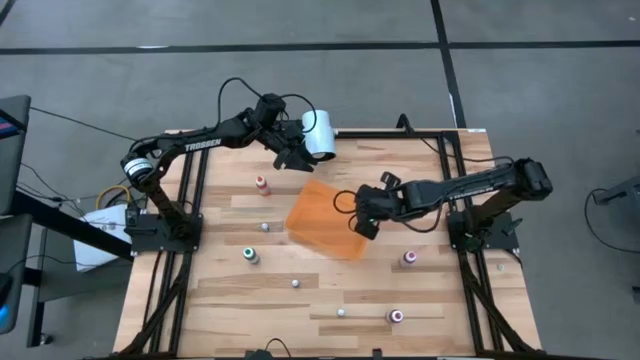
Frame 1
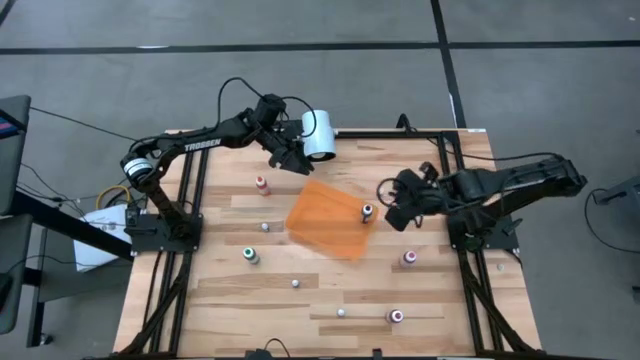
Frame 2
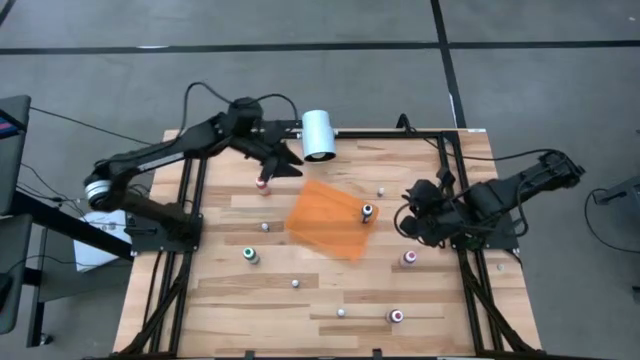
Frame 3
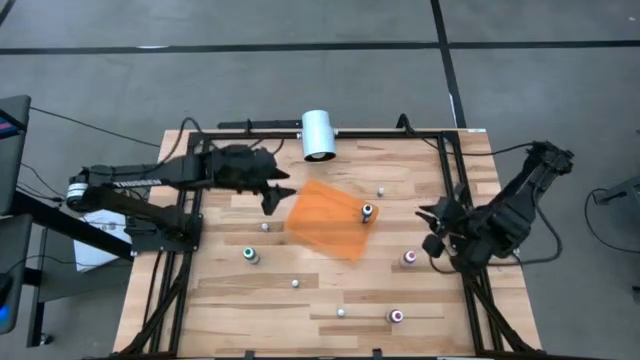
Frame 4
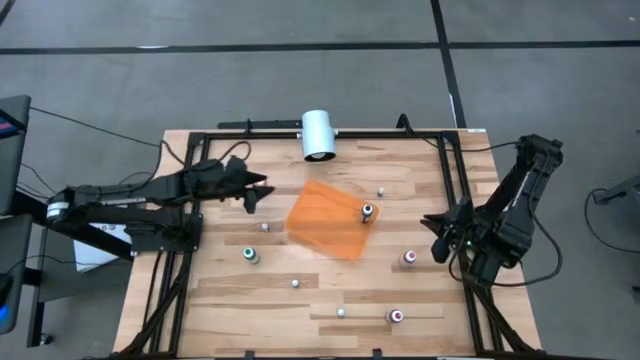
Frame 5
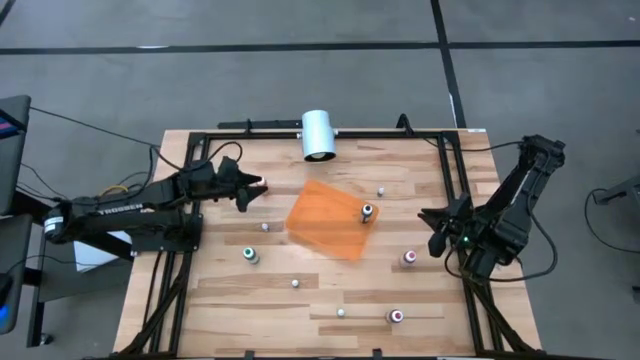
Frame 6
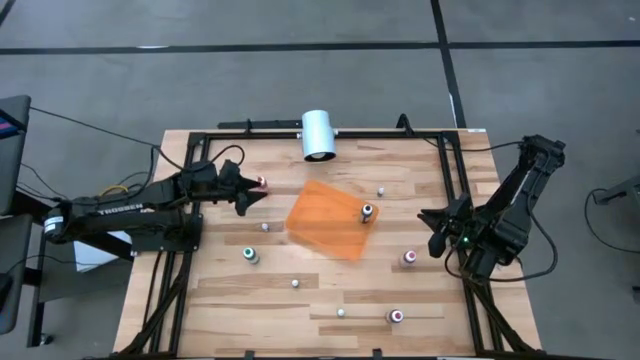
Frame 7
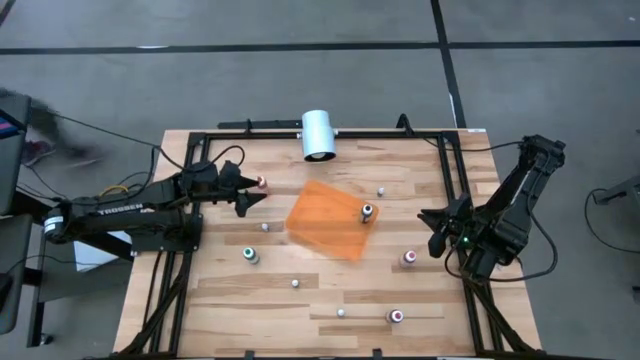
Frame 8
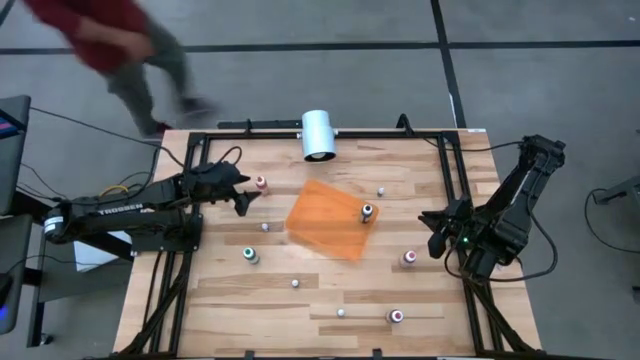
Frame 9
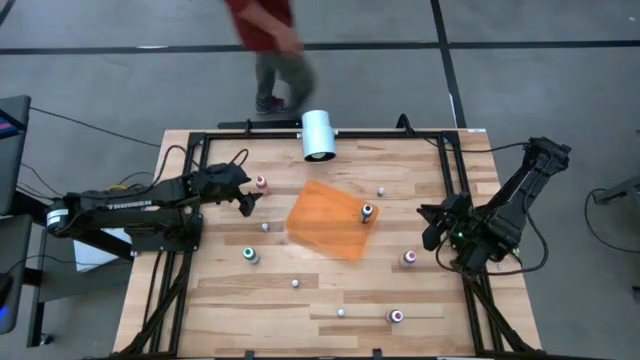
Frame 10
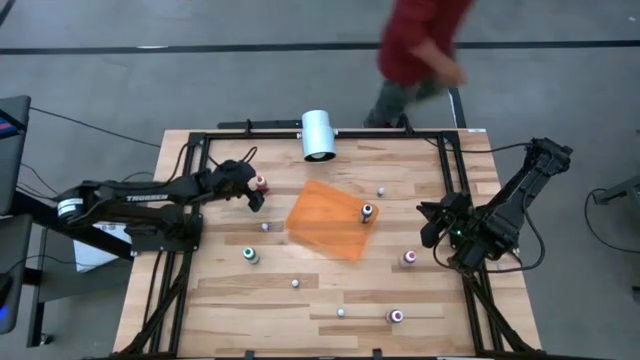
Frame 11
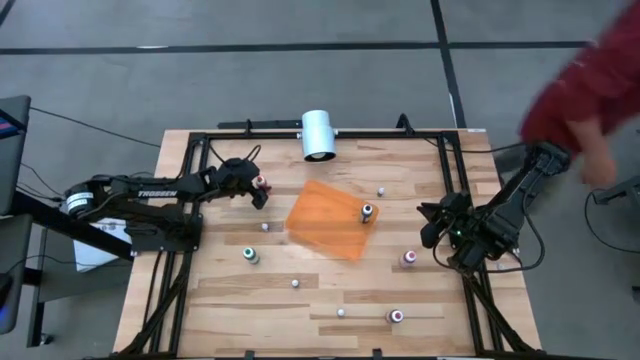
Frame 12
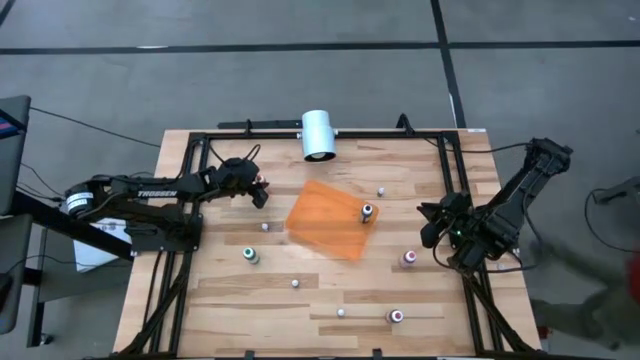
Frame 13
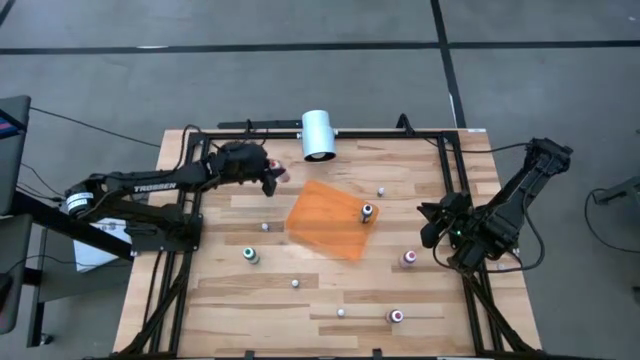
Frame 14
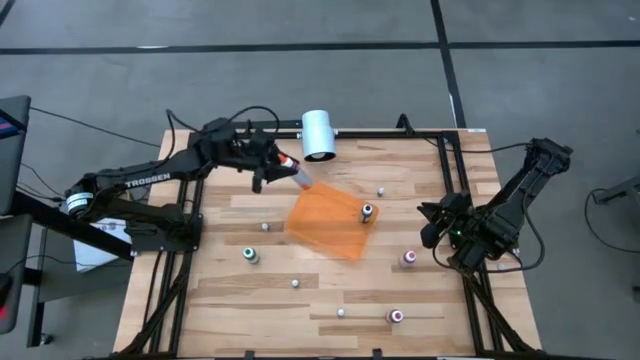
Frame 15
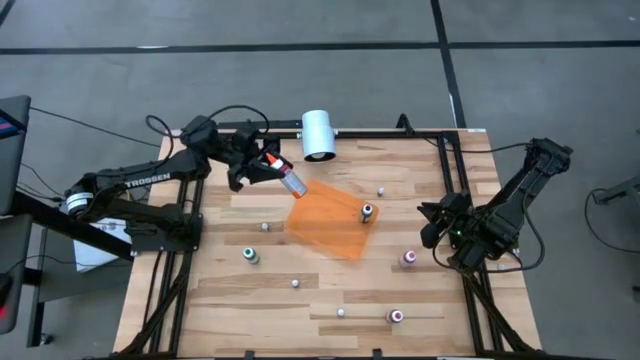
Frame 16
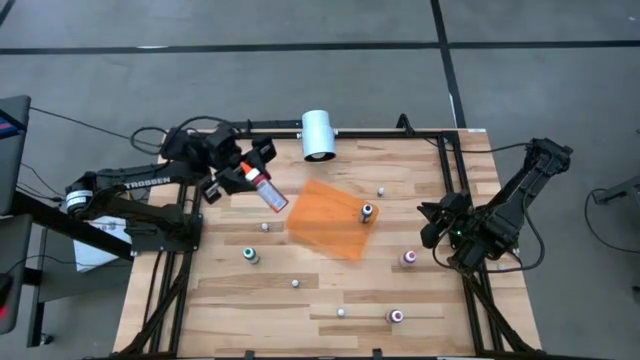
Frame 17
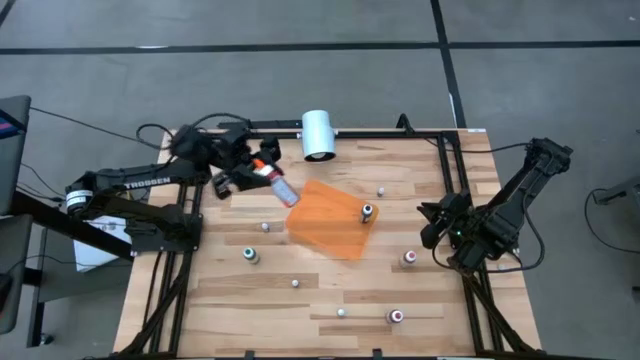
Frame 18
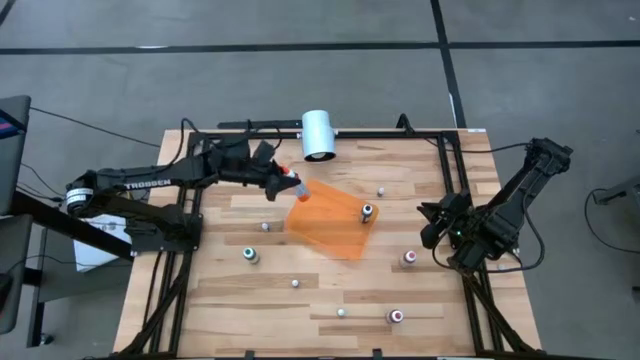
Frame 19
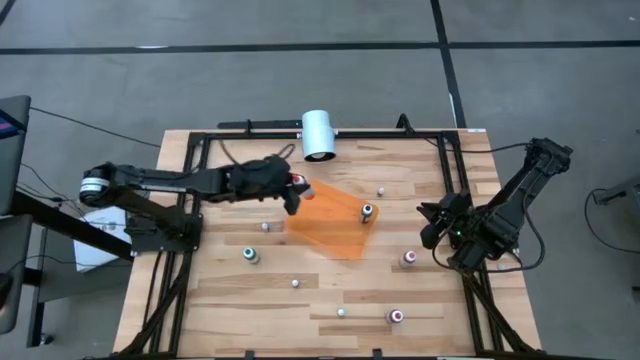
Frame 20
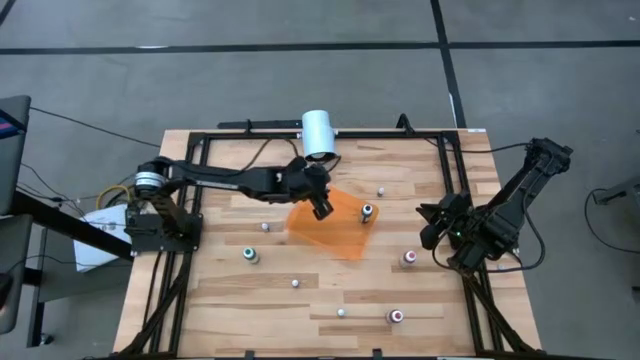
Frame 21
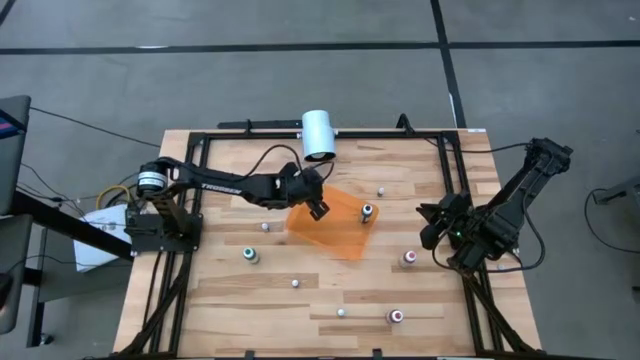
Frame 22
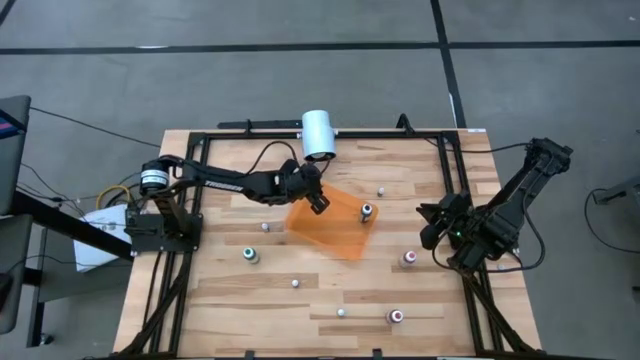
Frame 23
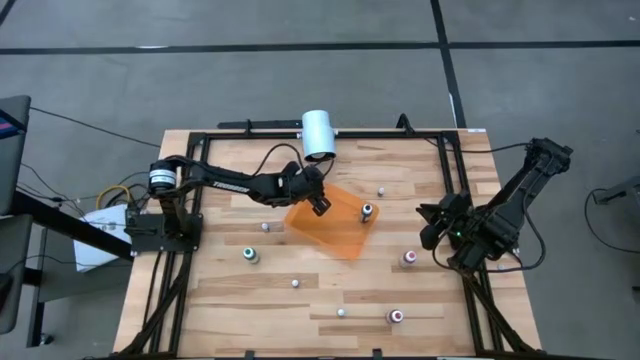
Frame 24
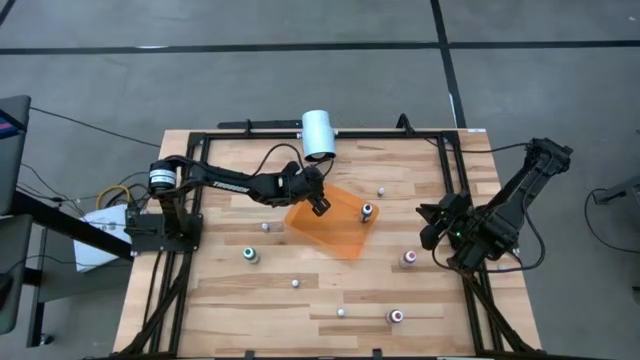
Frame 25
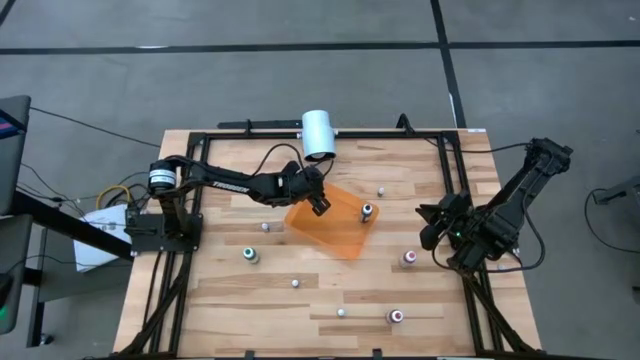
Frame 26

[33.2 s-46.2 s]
Task: Pick & Place food coloring
Put the orange food coloring bottle into the bin

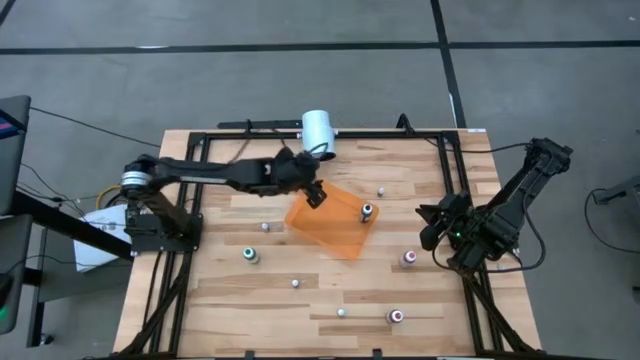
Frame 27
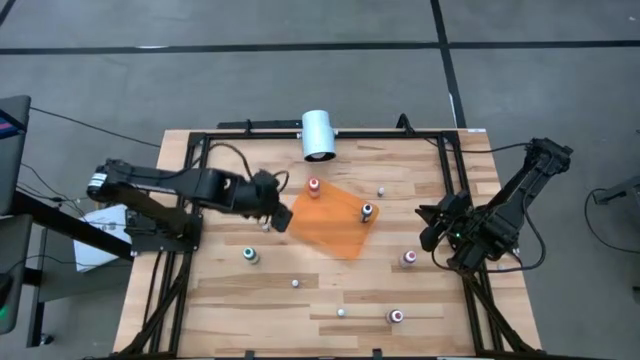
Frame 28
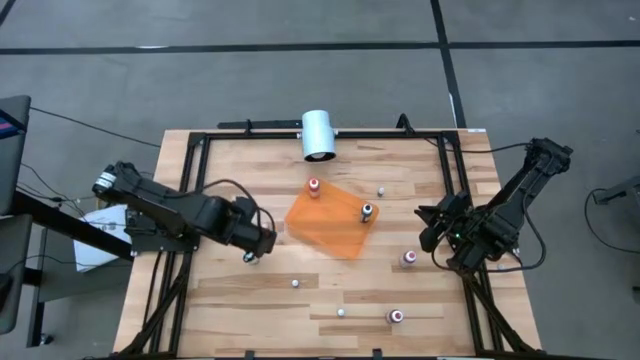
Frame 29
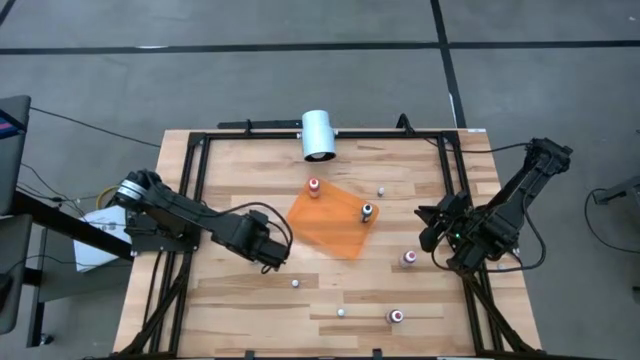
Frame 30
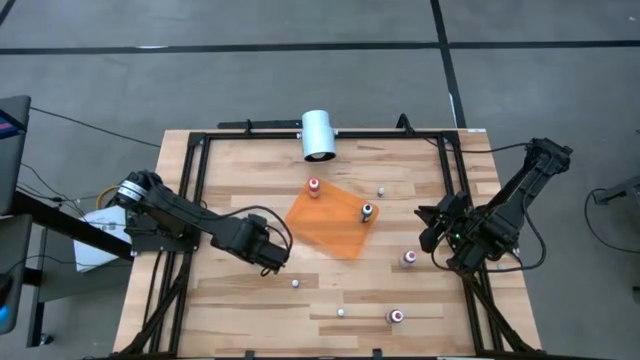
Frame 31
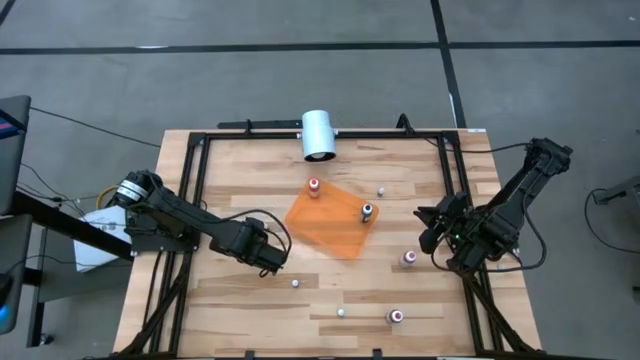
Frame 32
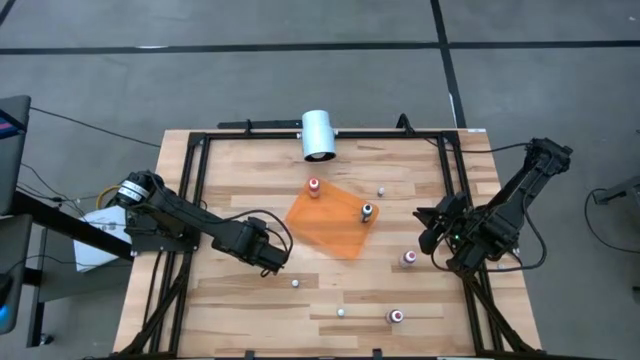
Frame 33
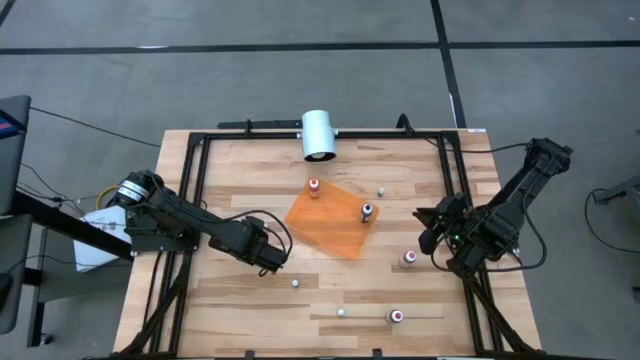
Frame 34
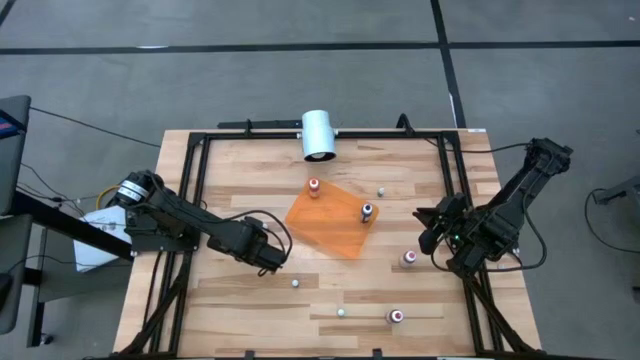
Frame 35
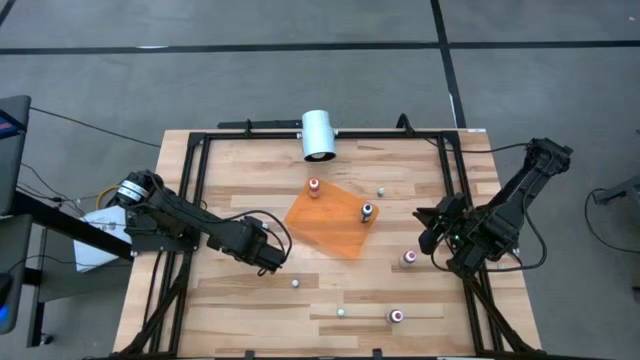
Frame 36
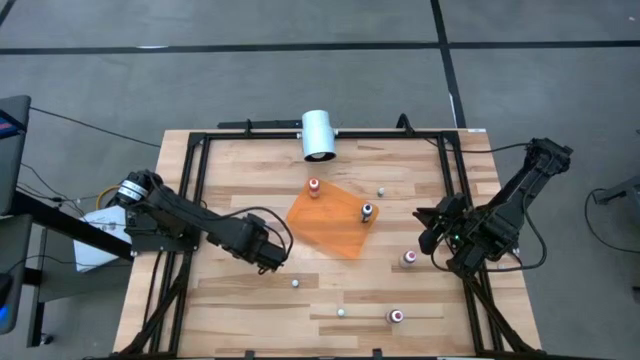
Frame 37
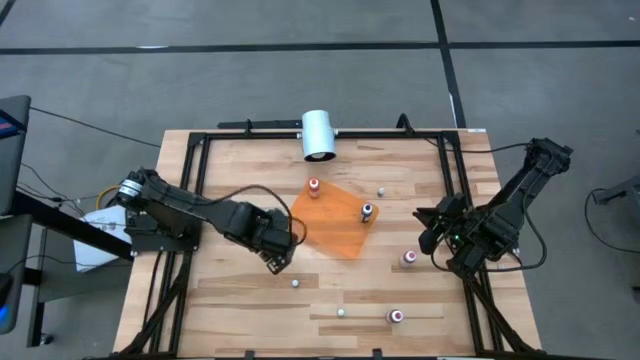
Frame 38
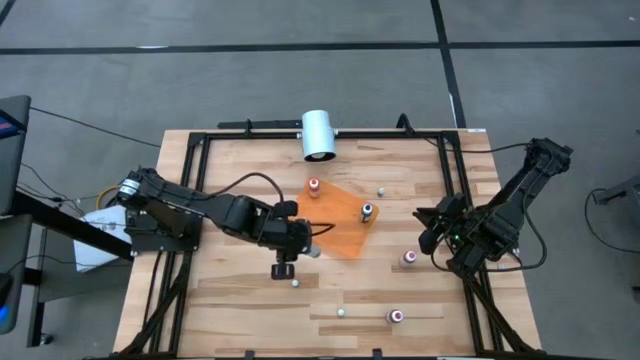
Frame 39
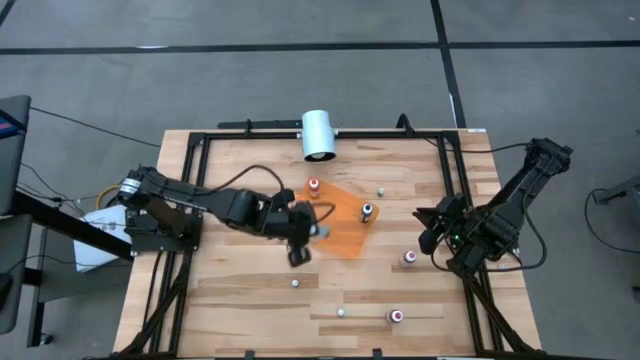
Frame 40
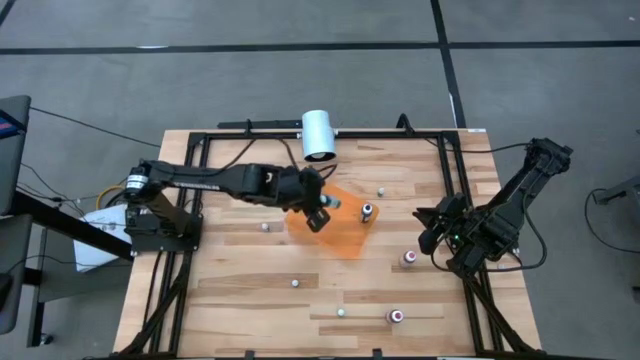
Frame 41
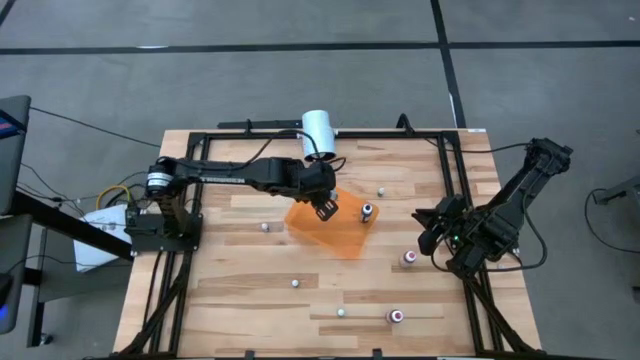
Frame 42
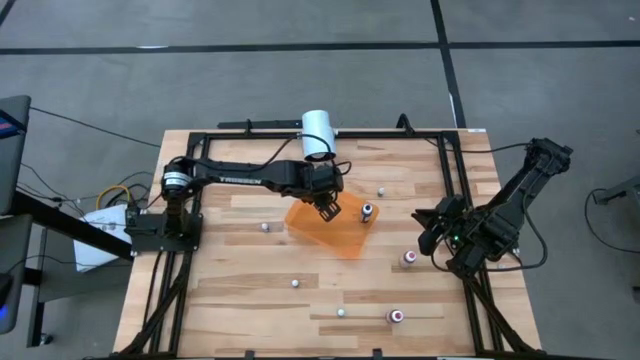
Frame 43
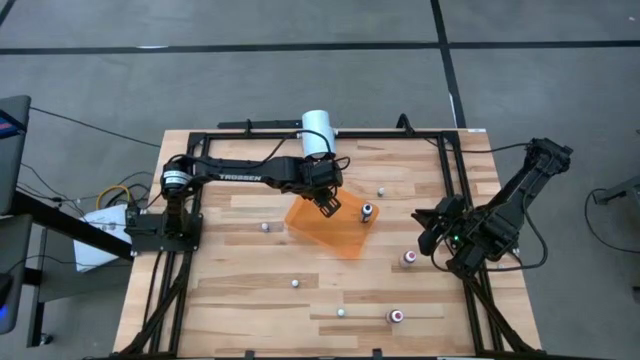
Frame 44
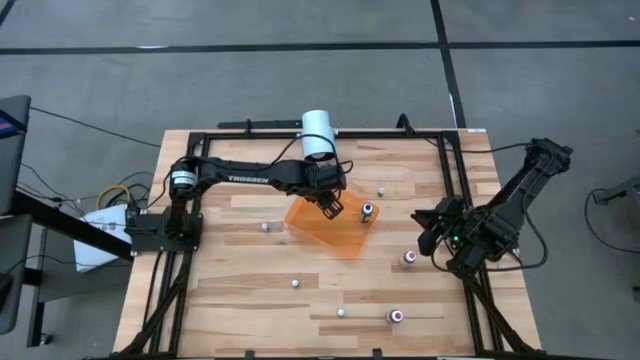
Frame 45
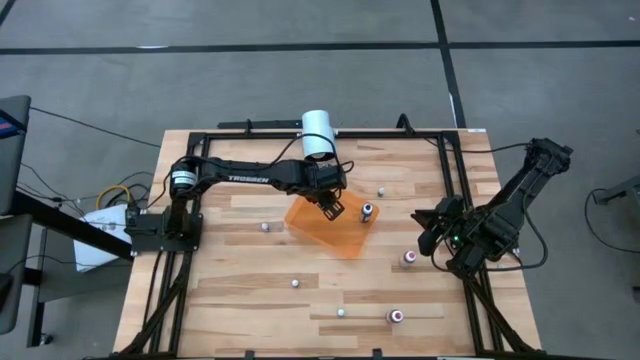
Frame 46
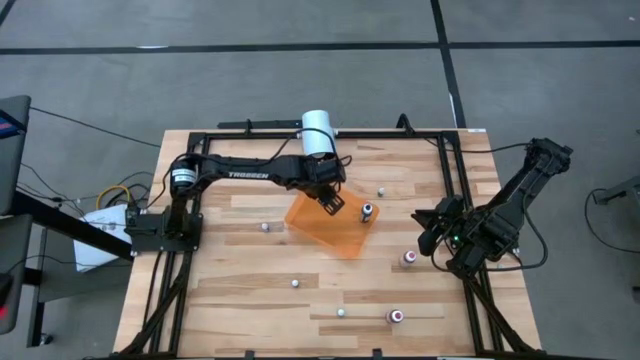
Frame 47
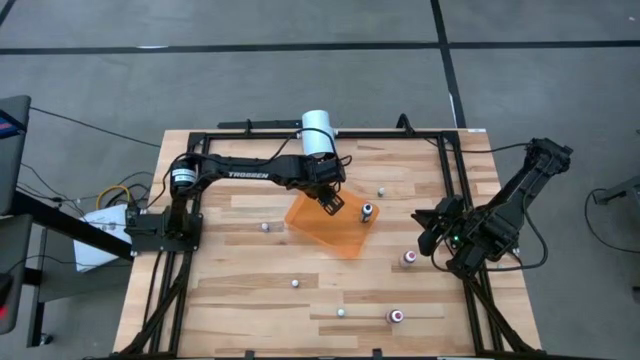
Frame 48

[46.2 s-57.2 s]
Put the large green food coloring bottle into the bin
